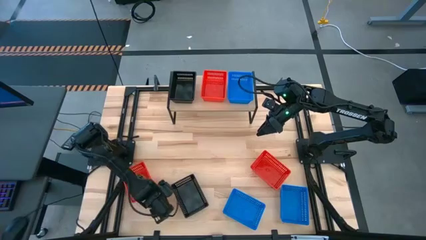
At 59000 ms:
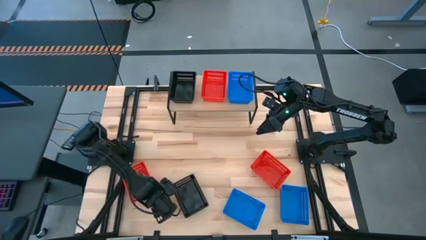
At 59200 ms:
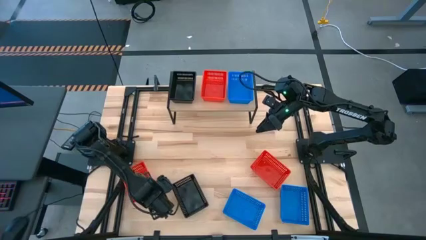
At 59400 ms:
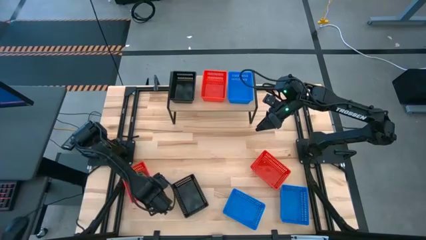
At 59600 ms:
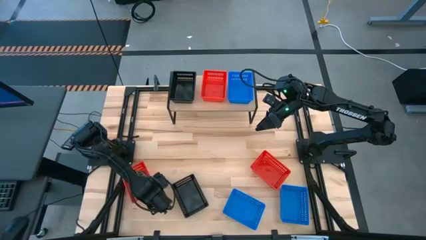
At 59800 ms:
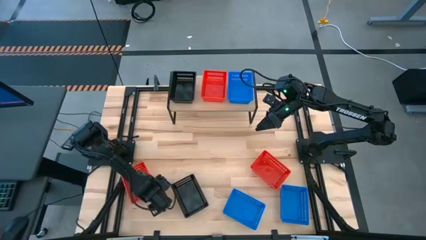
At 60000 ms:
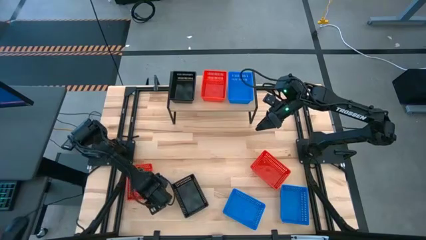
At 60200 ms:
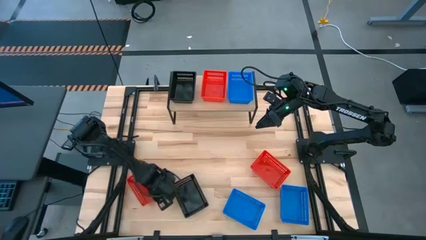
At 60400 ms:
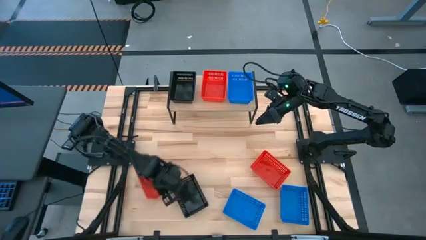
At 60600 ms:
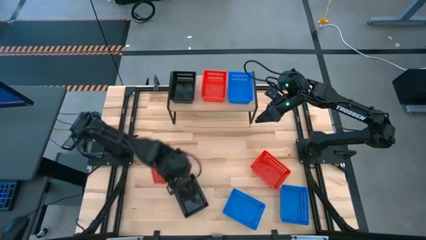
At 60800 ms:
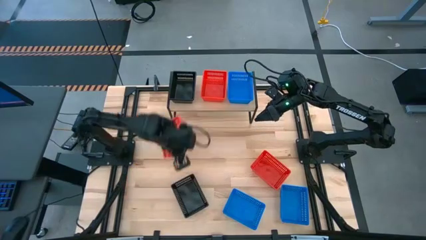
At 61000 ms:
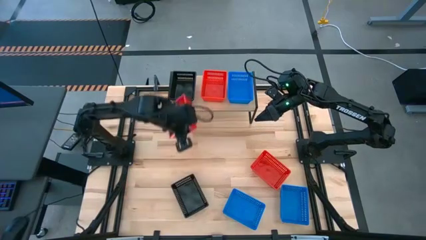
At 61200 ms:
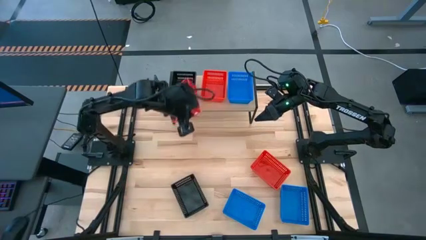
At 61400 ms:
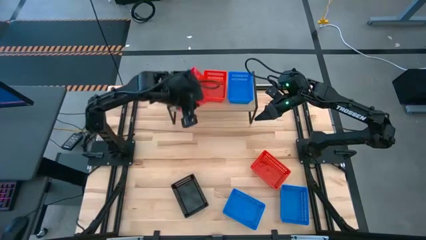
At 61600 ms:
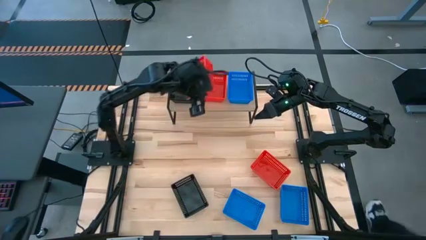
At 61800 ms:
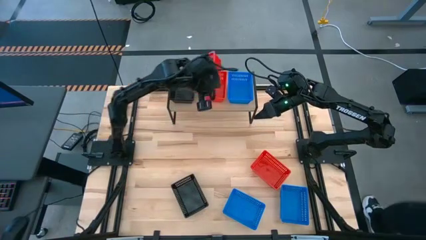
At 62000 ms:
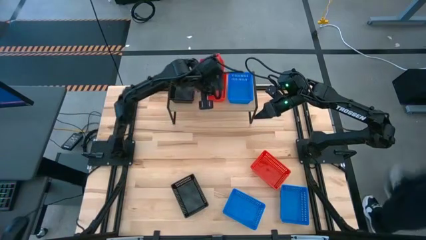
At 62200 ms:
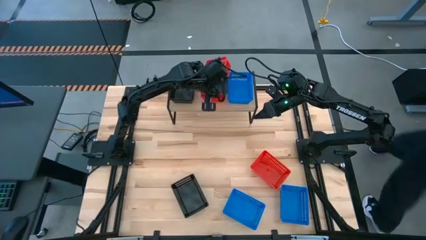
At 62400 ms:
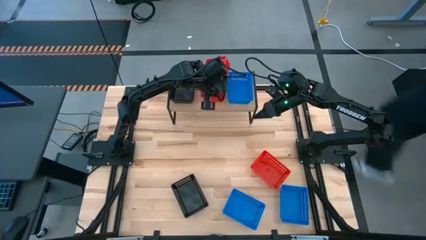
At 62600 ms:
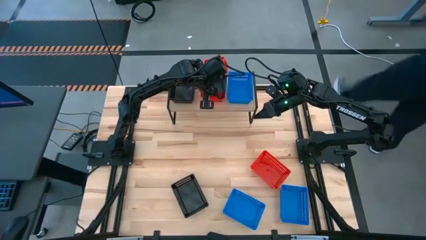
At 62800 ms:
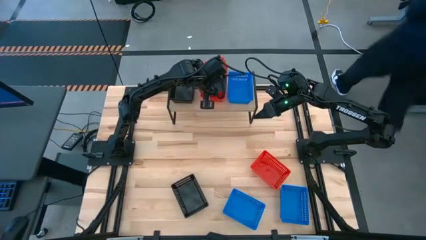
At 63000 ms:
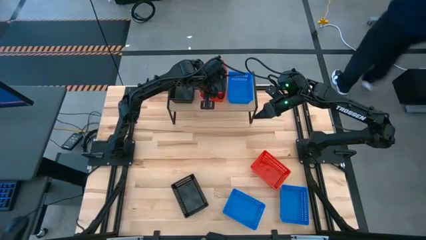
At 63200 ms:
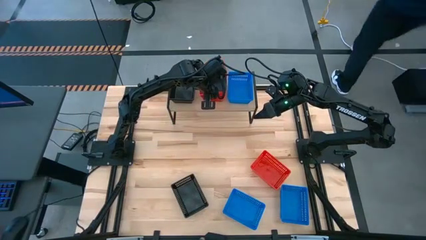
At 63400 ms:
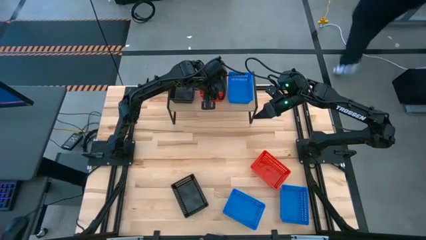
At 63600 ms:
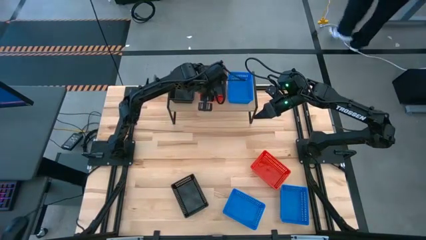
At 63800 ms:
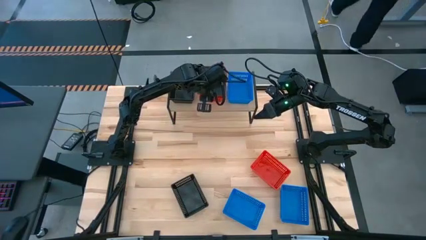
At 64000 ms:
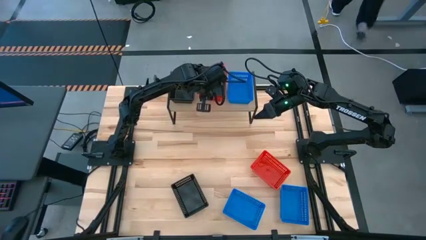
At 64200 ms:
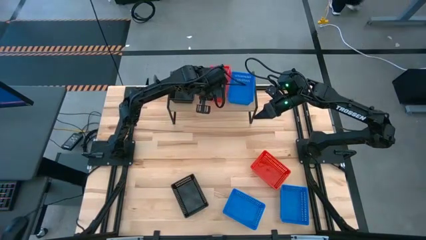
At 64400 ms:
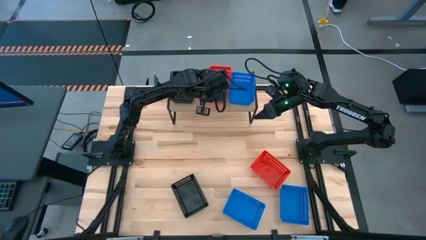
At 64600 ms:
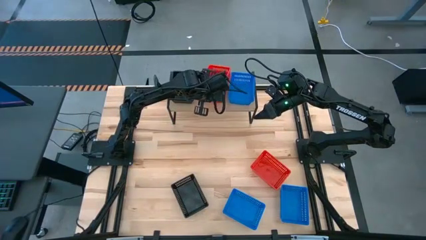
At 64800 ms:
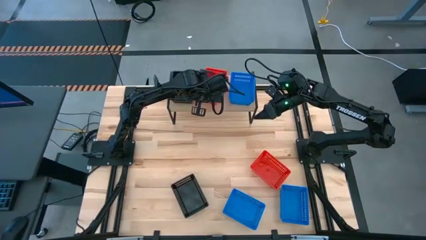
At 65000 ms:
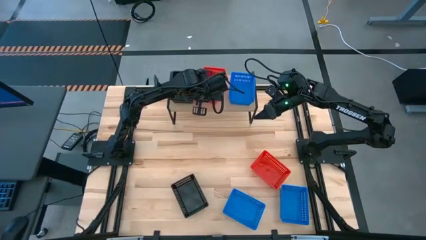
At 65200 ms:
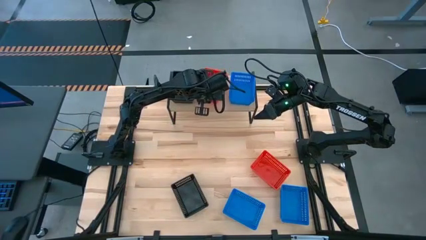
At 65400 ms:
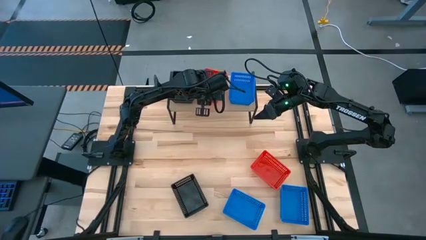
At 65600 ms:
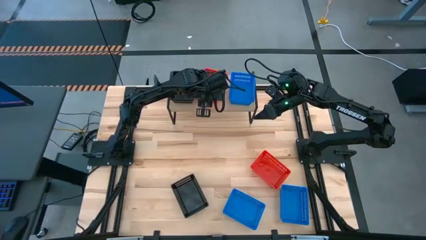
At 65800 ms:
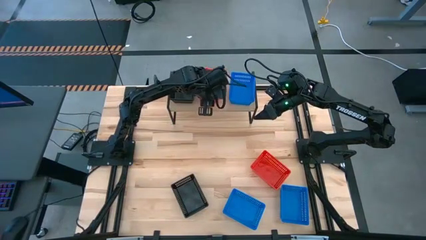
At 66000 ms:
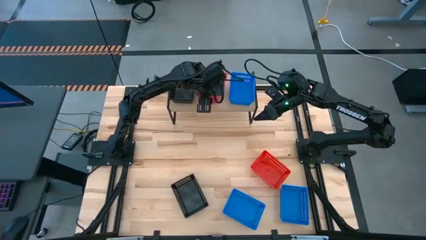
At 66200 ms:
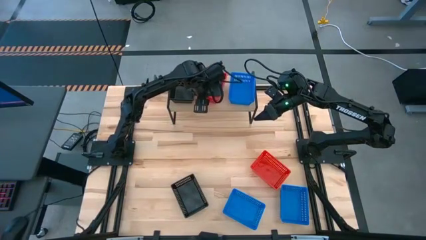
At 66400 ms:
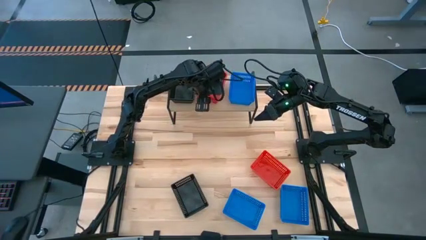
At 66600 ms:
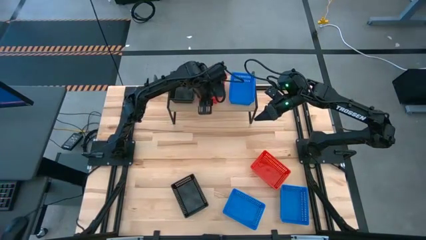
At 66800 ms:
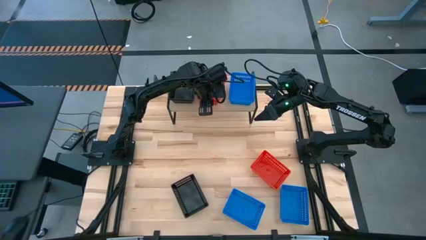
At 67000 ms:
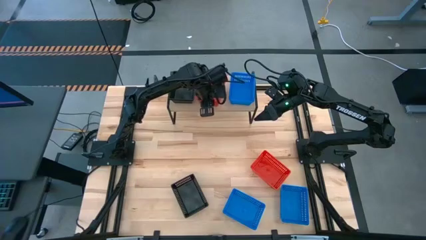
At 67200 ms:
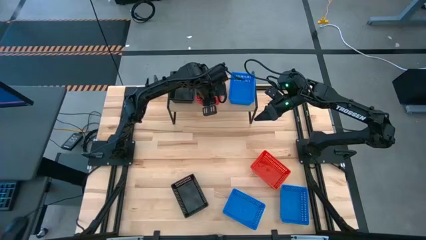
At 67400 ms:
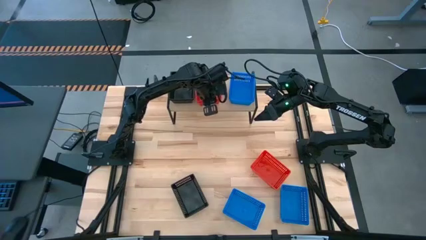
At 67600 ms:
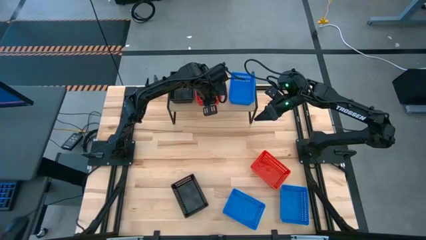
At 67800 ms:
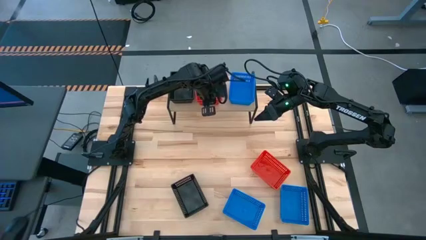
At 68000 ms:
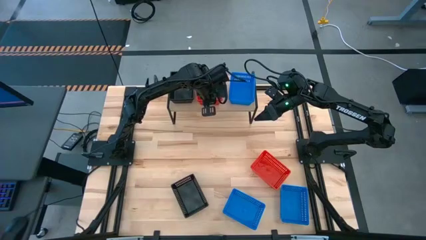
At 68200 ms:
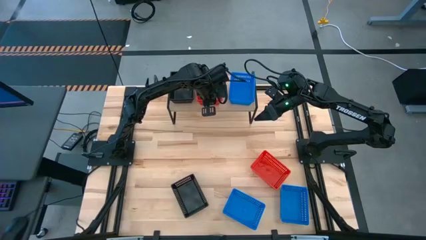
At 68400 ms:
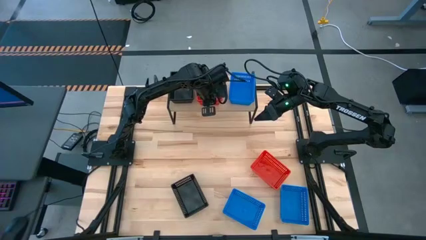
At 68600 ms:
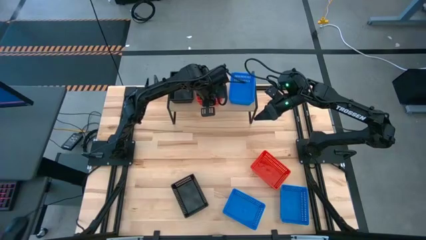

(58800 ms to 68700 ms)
Task: Stack baskets on shelf by color
Stack the left red bin on the red bin on the shelf
